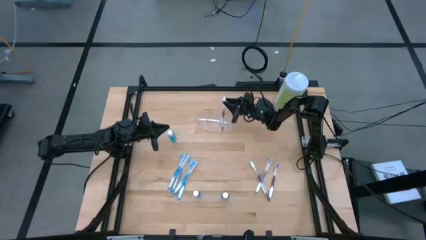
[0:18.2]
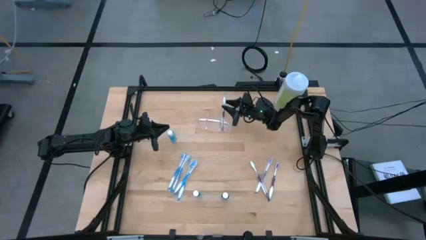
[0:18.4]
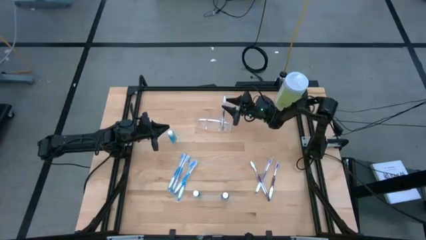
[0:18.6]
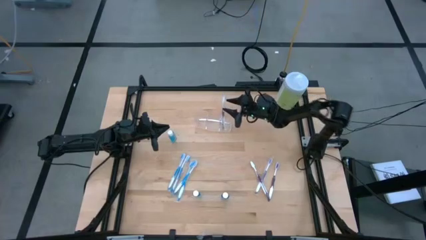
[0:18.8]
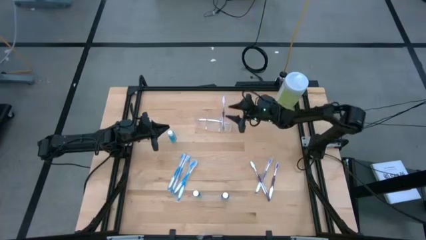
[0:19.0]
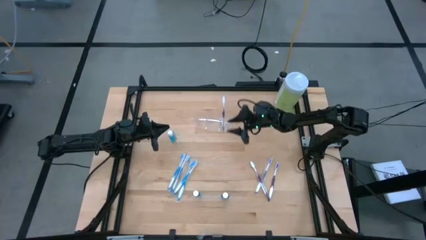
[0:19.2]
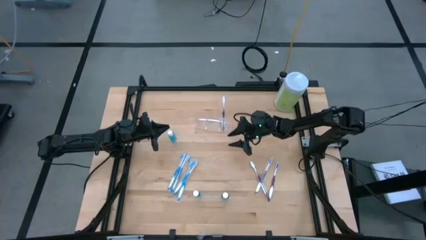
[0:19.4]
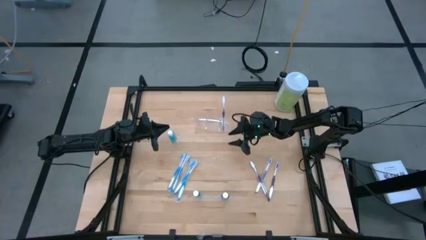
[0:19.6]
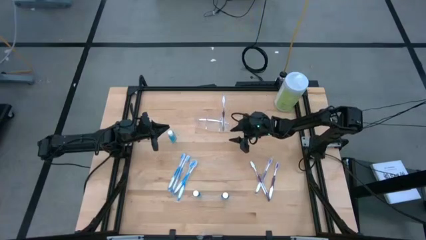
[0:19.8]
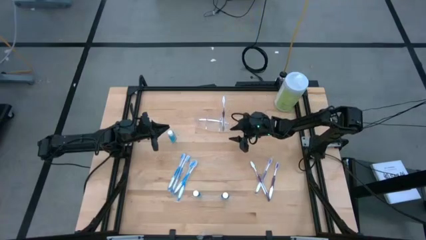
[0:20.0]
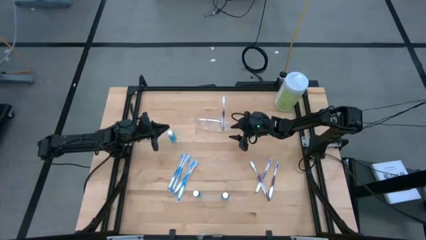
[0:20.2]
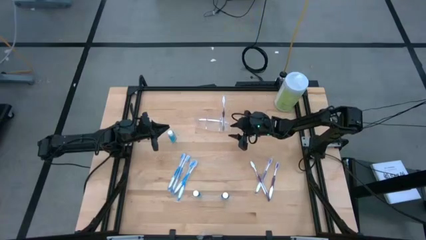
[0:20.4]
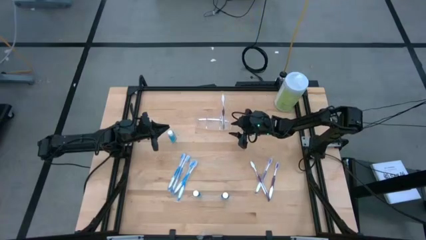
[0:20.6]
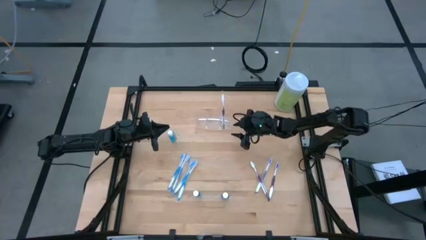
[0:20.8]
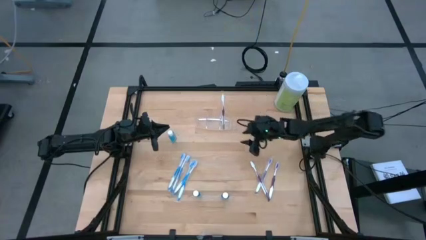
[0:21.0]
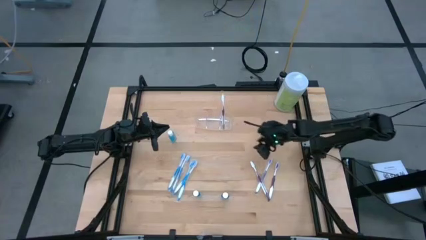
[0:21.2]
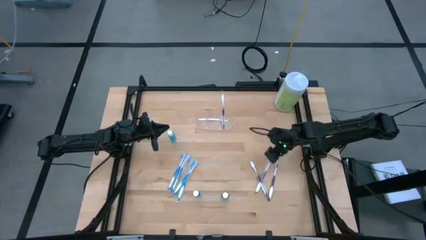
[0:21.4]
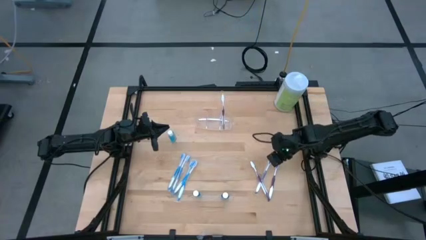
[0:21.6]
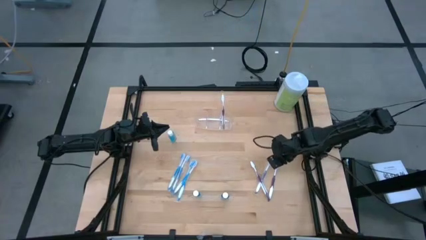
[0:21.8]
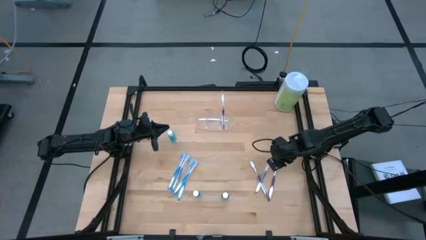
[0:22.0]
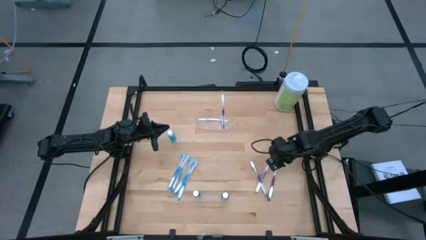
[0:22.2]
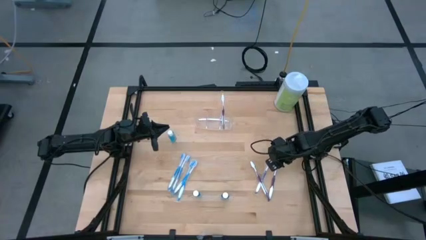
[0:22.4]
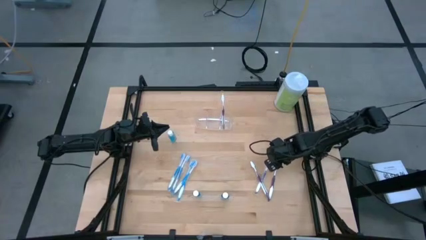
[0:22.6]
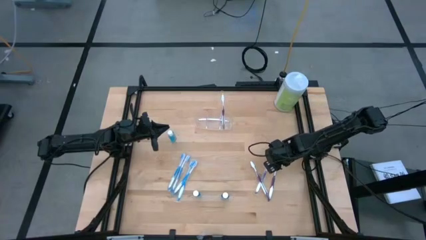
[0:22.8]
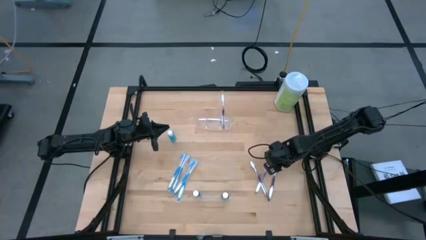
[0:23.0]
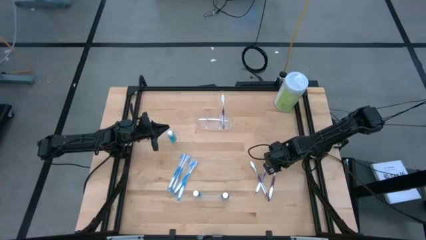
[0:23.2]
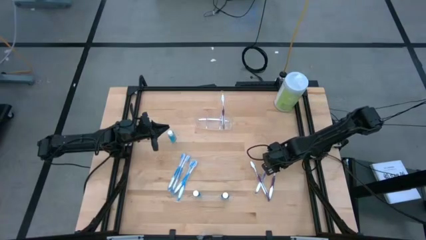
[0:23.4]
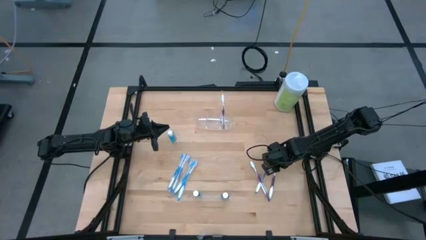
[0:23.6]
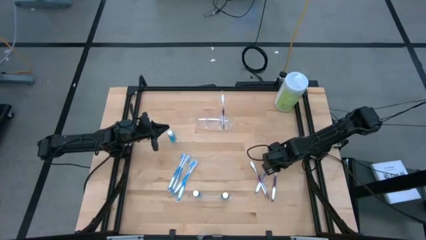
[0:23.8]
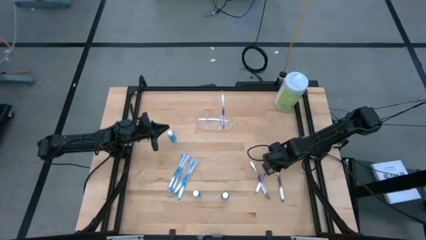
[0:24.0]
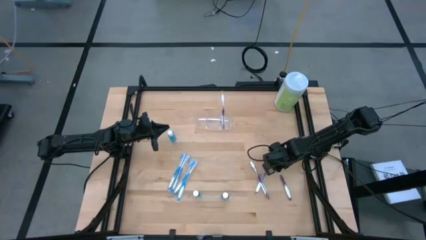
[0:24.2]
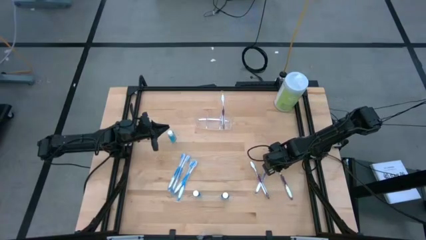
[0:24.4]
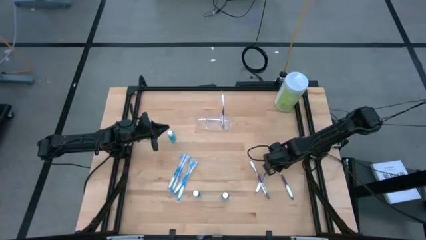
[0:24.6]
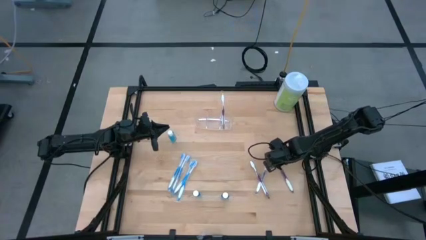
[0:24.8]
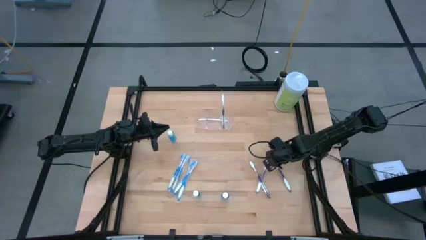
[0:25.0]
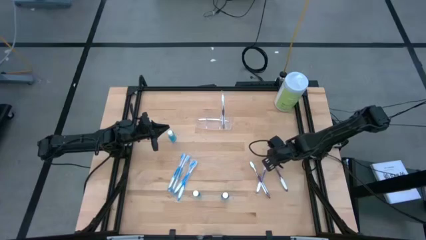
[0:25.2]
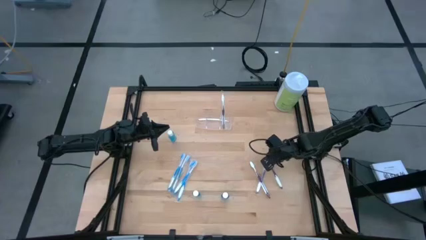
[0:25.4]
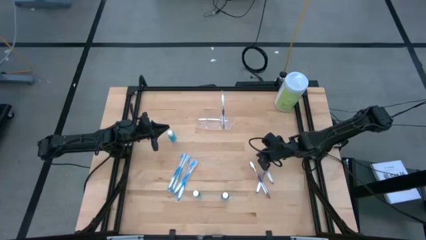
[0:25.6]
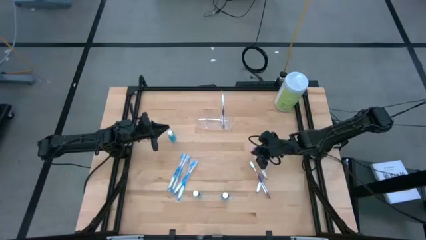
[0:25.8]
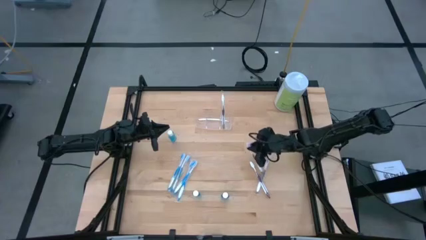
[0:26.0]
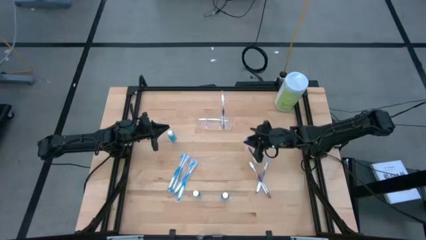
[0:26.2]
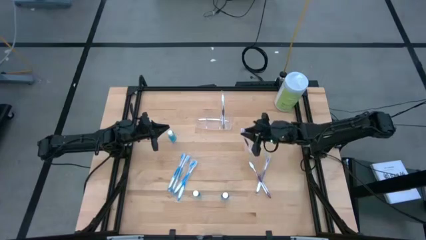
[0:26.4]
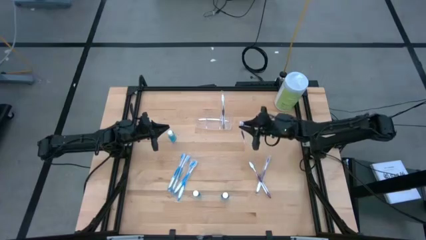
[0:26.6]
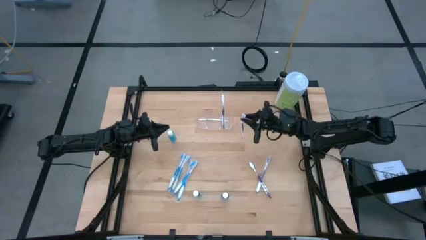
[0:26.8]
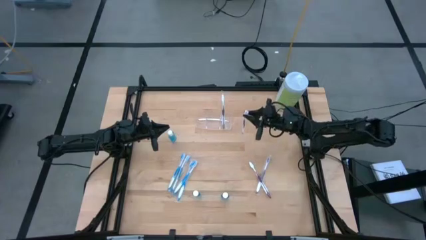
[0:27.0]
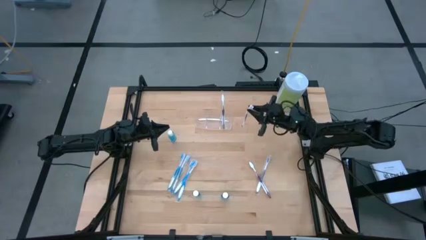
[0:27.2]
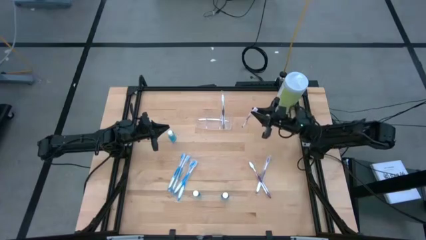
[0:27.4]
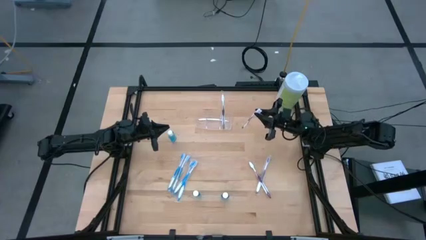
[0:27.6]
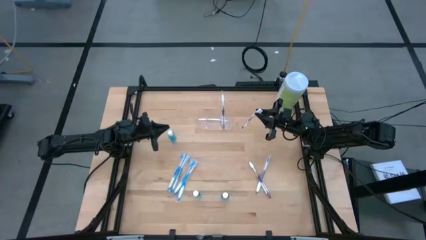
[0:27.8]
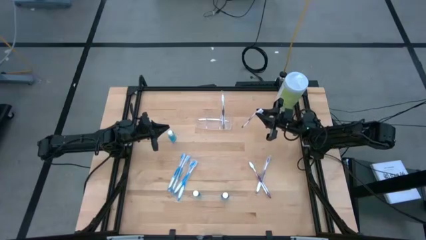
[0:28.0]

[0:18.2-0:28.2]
Task: Pick & Place toothbrushing station
Put the violet toothbrush into the transparent organizer
